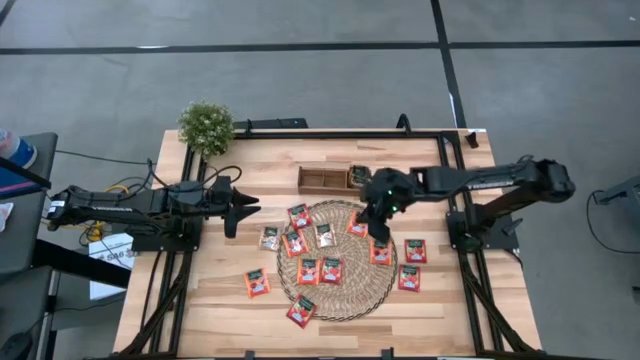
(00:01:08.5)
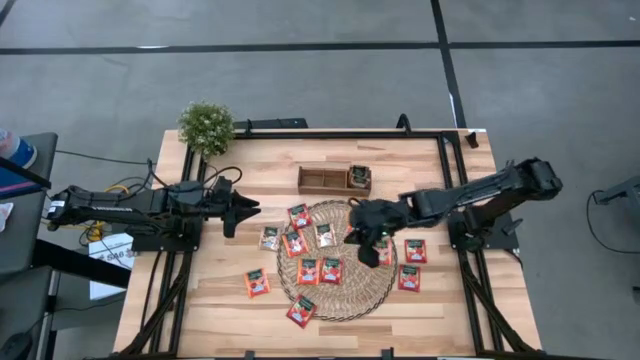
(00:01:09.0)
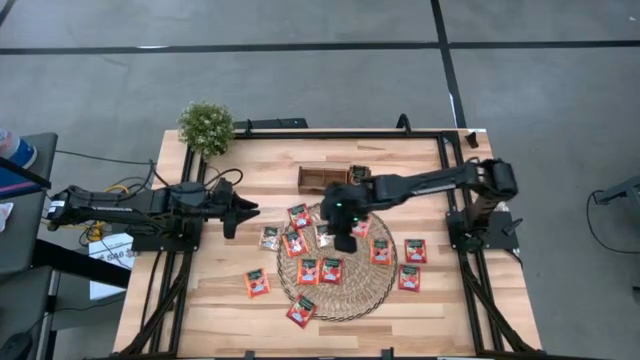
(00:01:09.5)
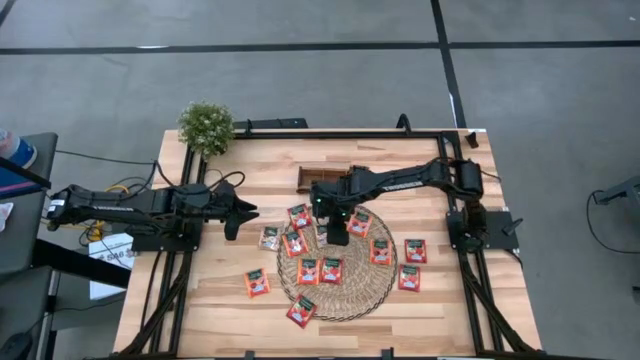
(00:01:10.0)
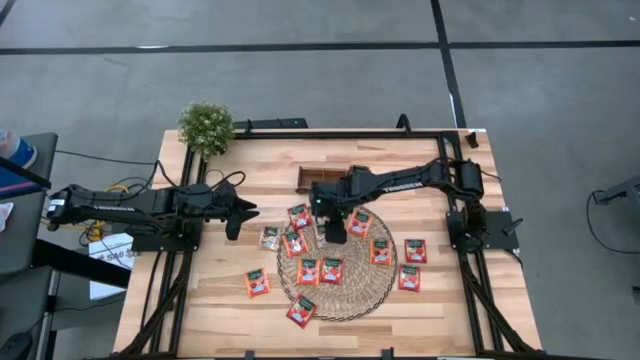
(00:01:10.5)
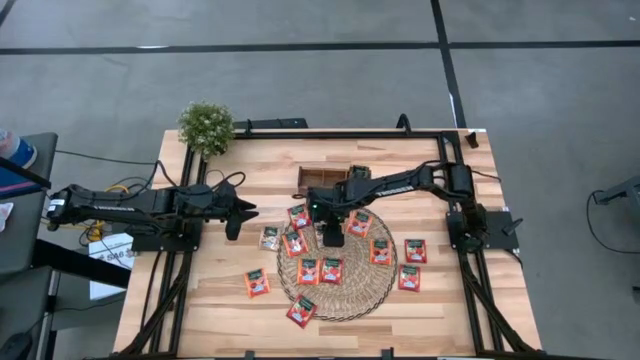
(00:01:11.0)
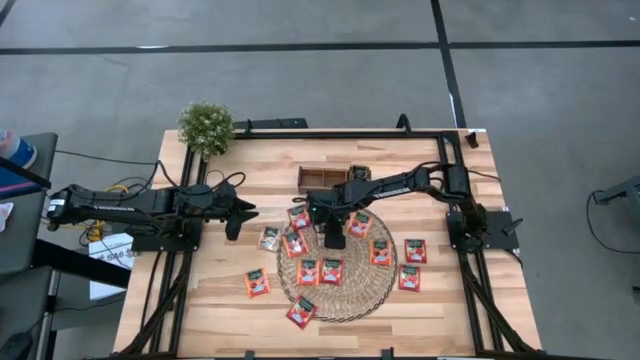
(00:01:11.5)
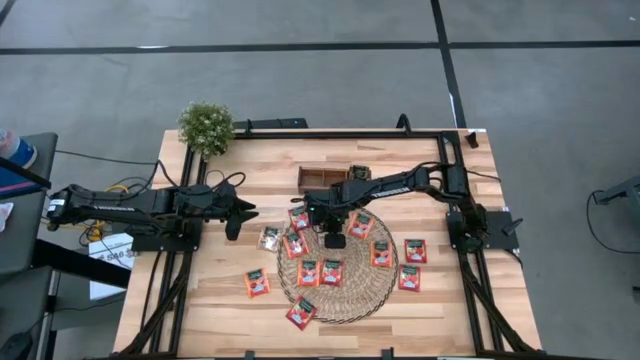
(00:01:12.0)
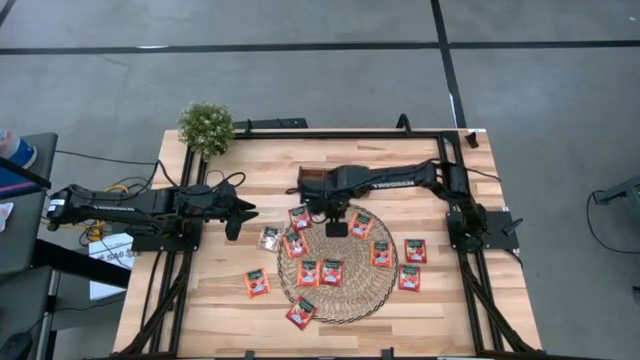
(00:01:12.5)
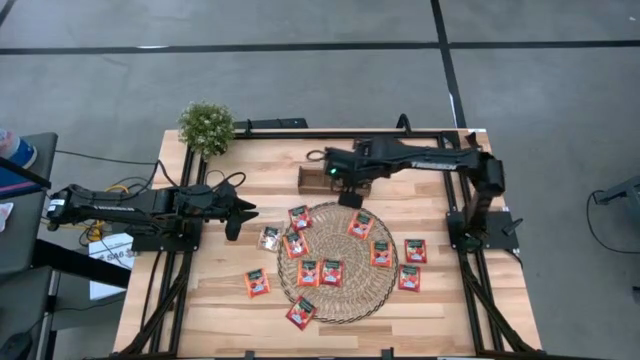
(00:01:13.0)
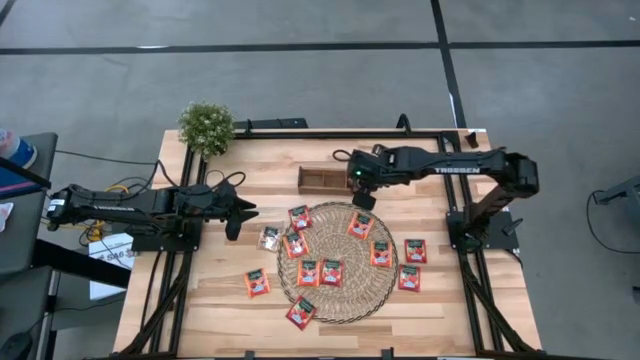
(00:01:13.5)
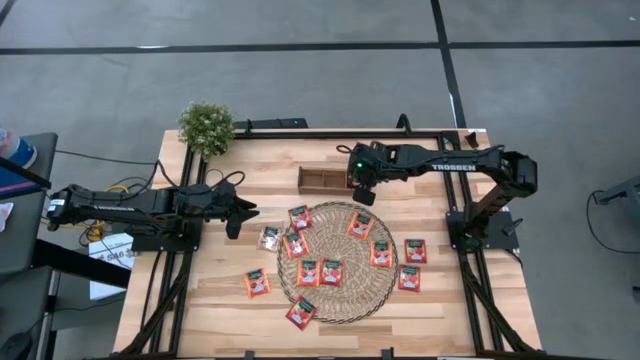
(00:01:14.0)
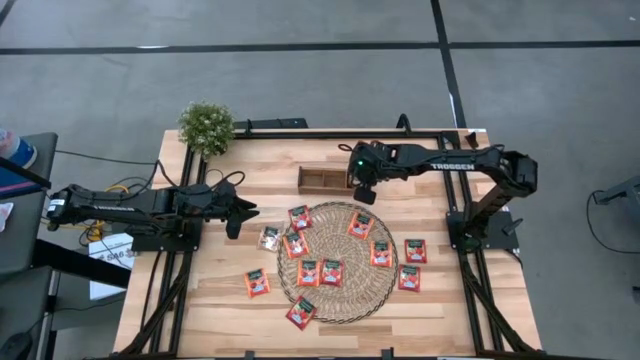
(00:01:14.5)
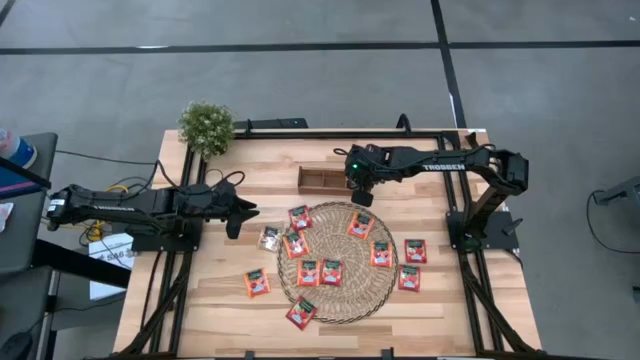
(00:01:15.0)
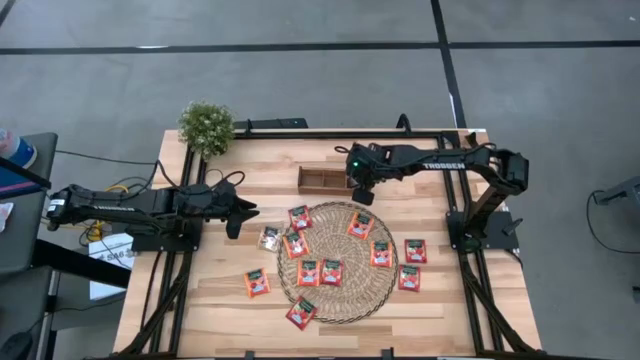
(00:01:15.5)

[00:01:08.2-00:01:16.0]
Task: Pick & Place Tea
Put the brown tea bag into the right section of the wooden organizer

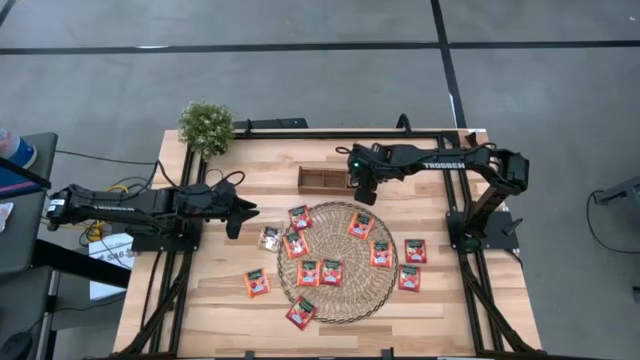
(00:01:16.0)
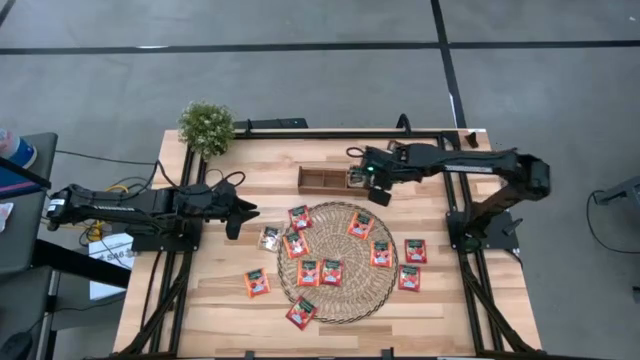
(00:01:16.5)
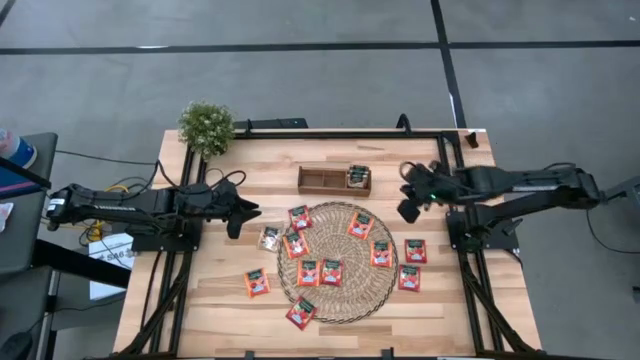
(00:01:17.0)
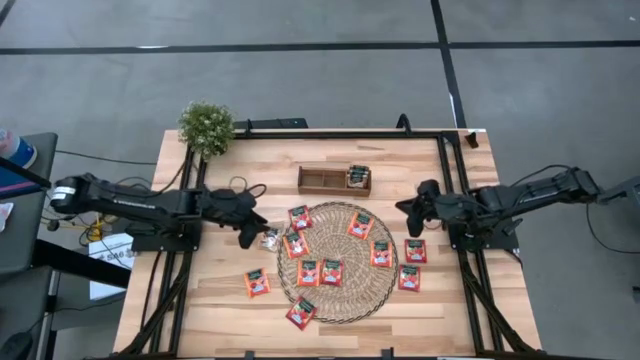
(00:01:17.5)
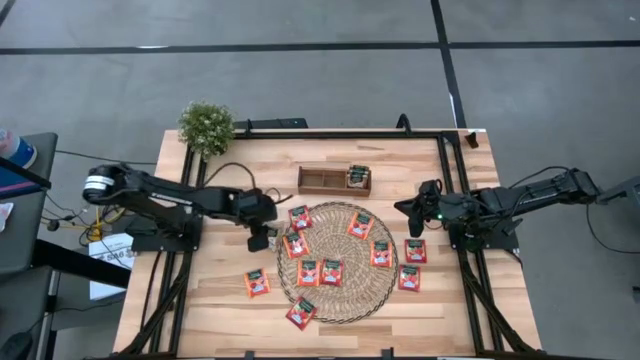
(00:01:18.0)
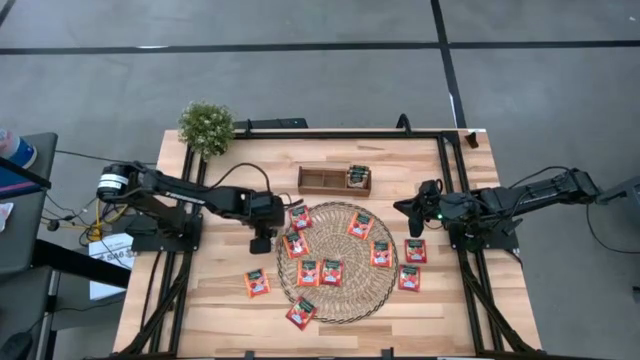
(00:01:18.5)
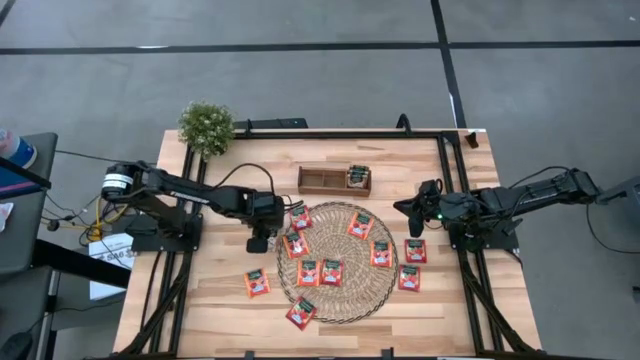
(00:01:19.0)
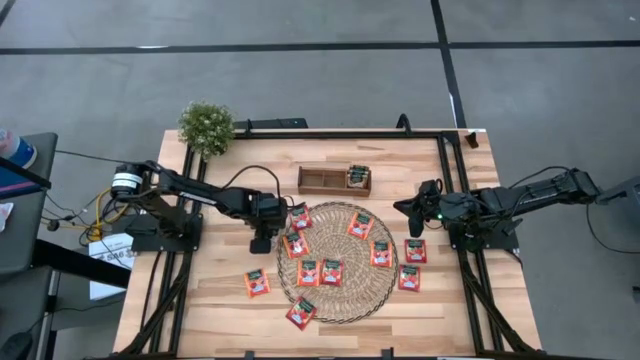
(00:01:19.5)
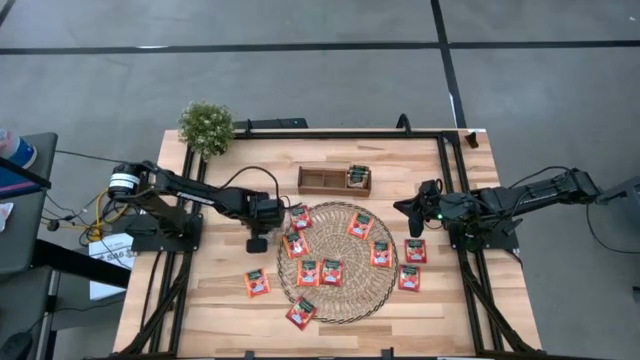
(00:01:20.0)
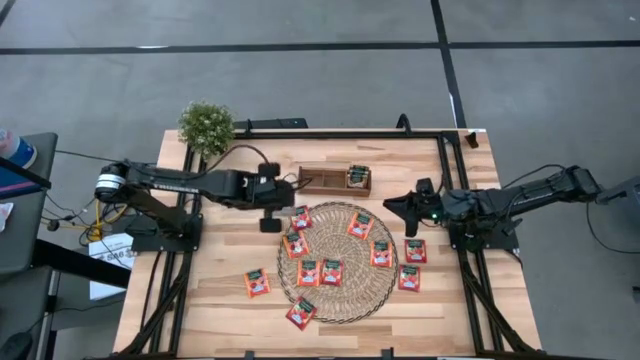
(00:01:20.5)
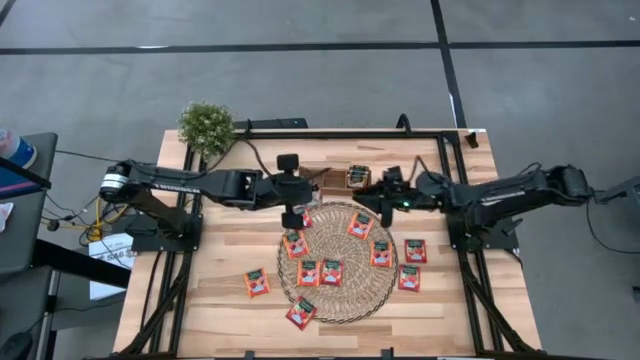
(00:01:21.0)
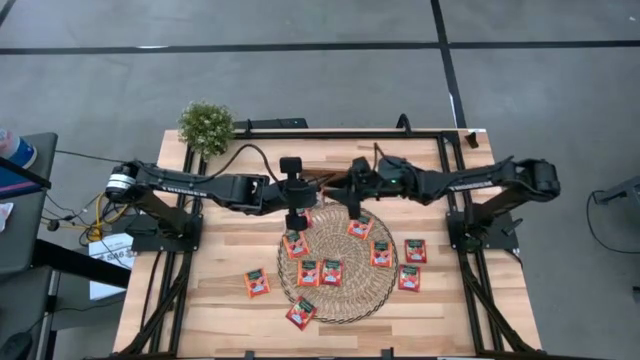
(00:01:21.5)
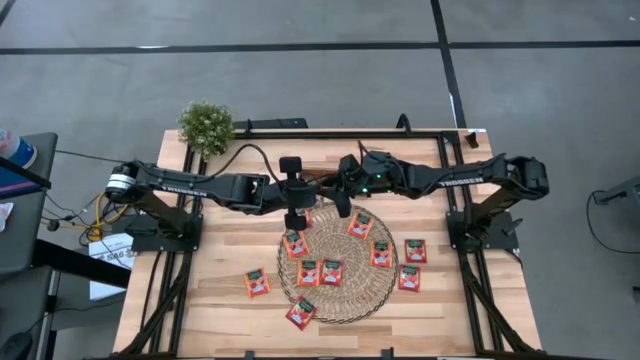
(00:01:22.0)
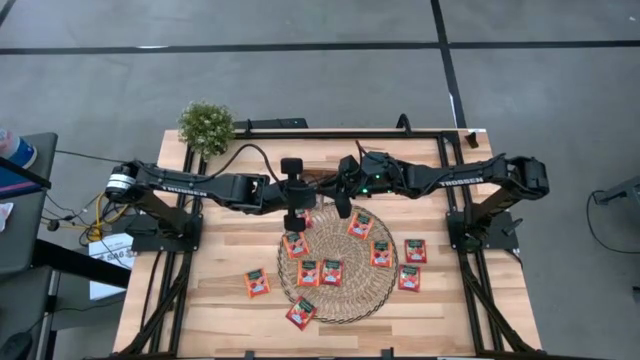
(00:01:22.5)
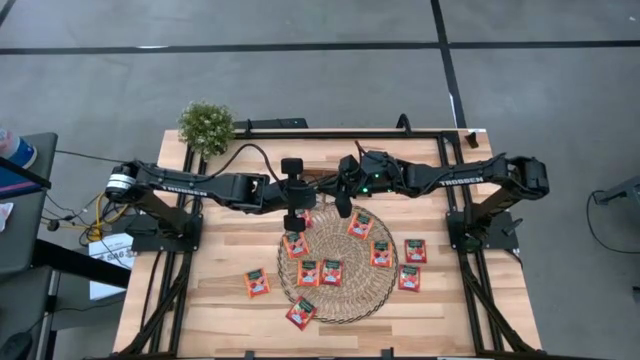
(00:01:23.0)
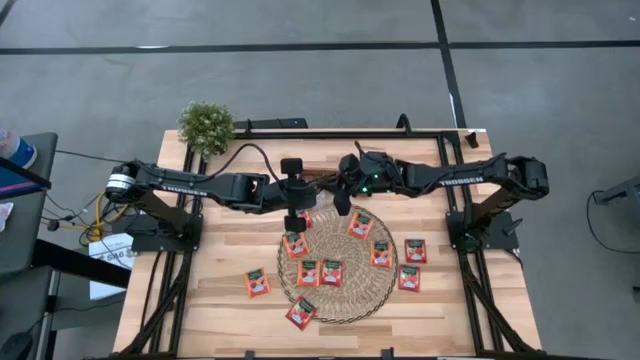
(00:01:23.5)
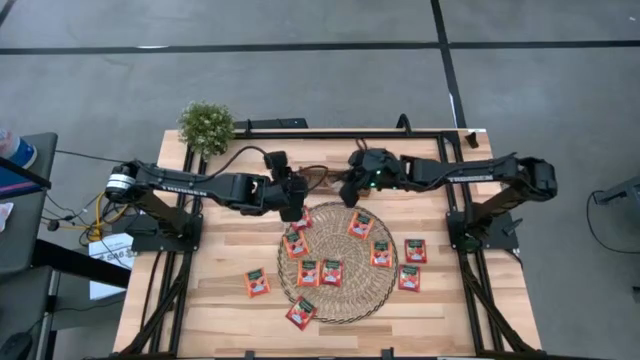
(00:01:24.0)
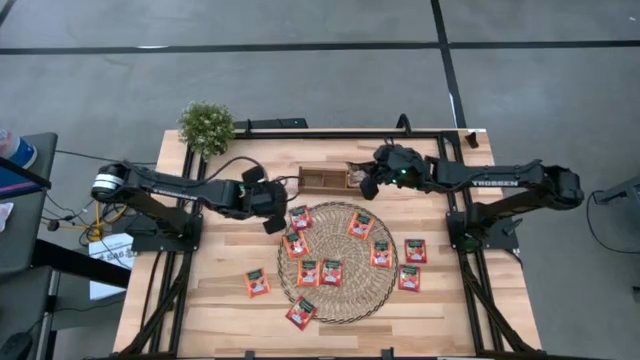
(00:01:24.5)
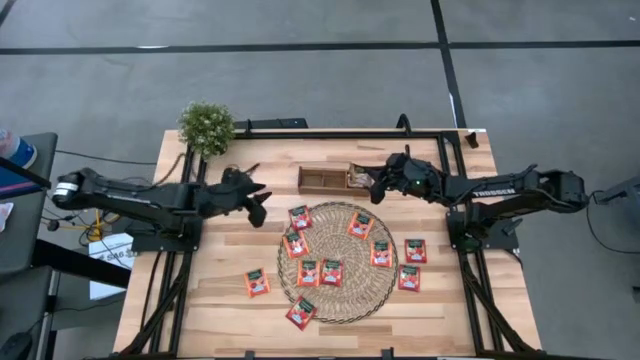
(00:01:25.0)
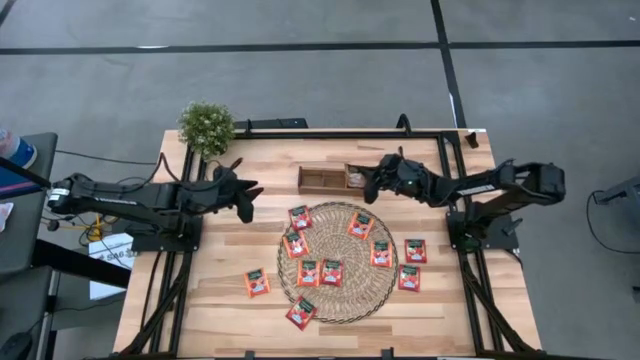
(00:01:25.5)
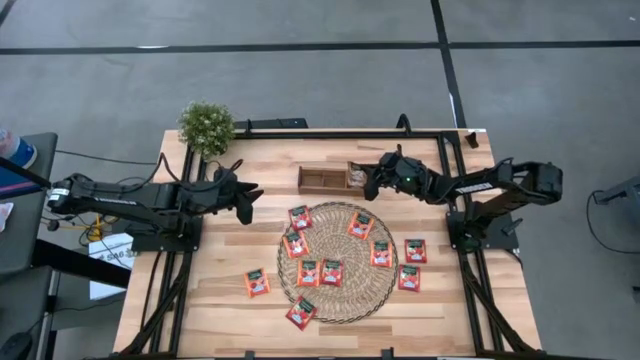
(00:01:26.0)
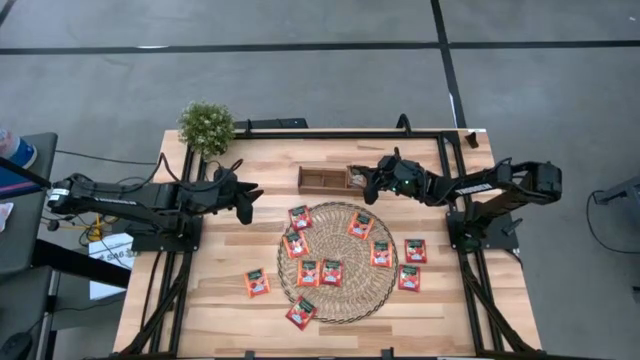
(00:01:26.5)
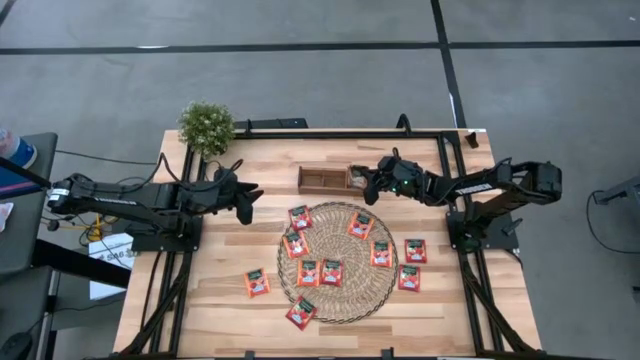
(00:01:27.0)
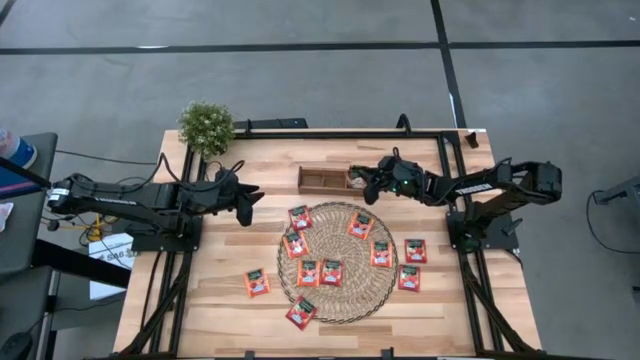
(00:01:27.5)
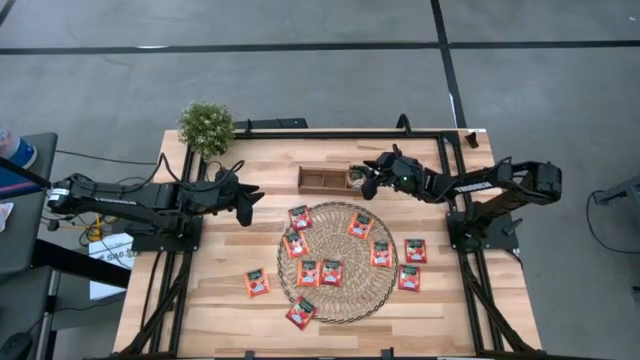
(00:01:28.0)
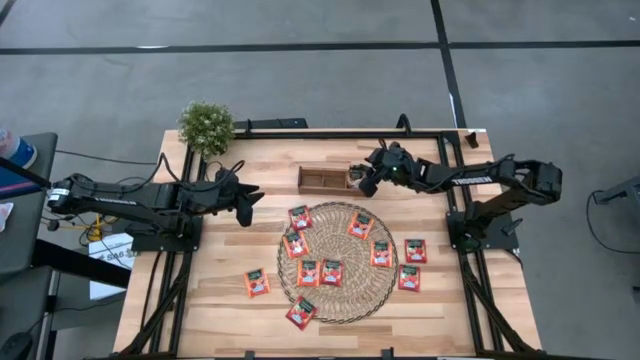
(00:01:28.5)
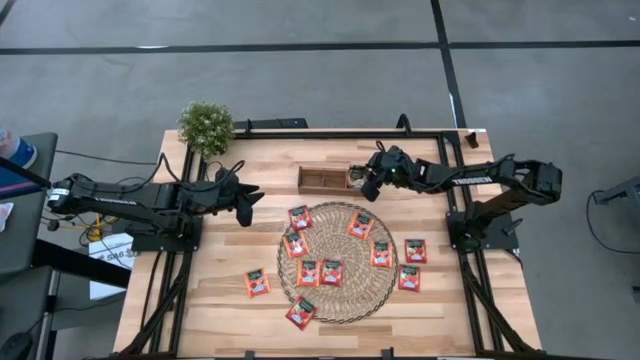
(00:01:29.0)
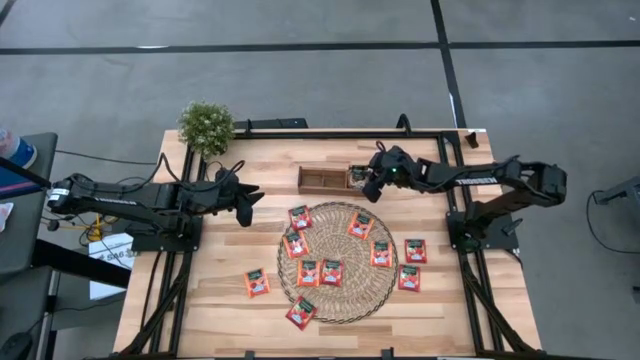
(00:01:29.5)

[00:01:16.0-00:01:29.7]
Put the brown tea bag into the right section of the wooden organizer
